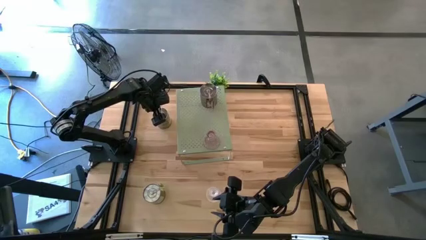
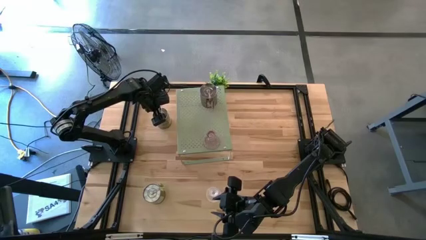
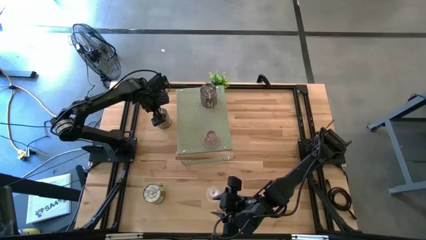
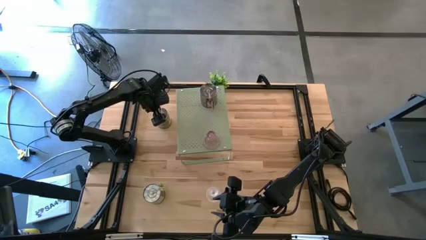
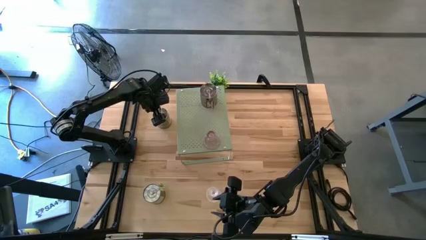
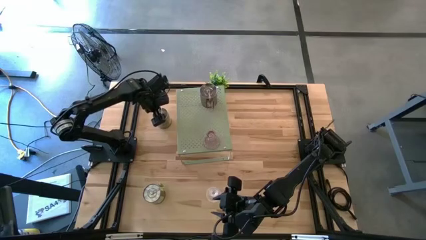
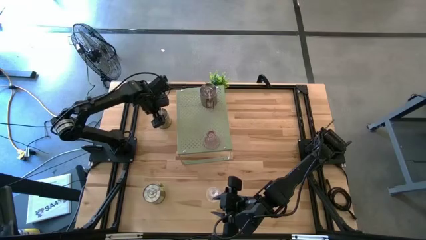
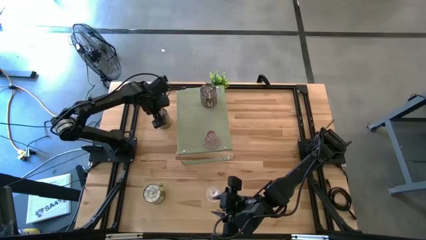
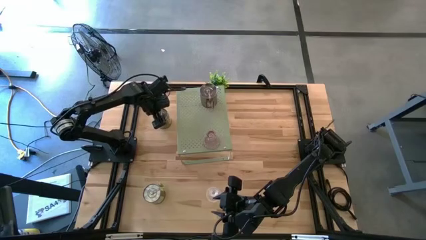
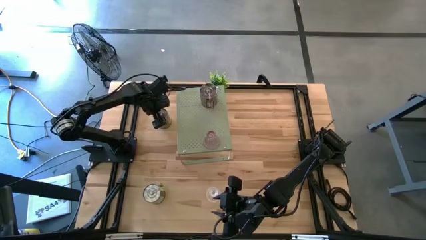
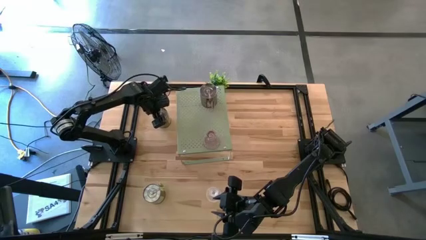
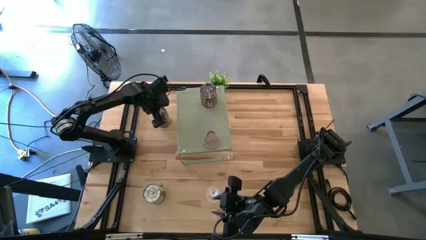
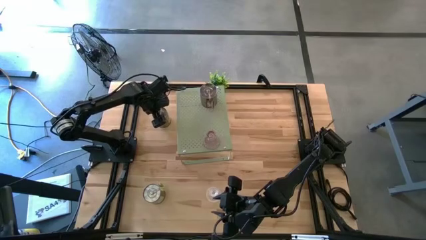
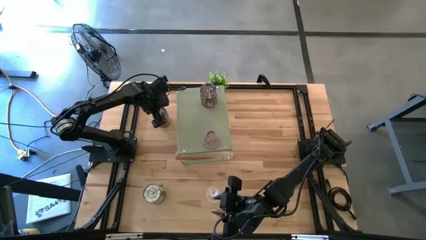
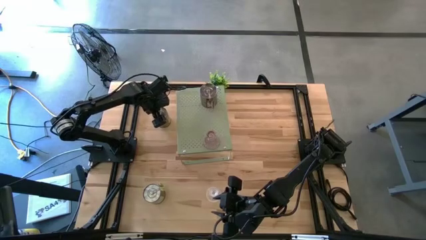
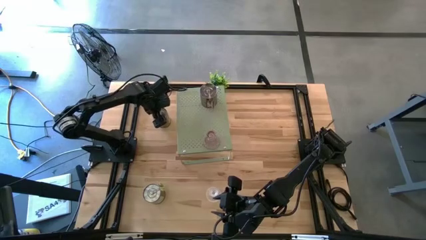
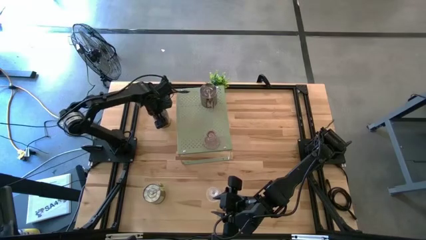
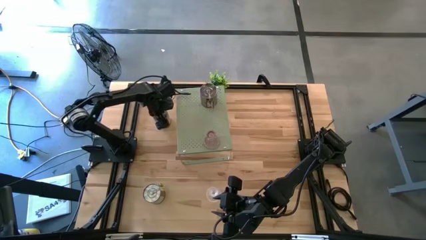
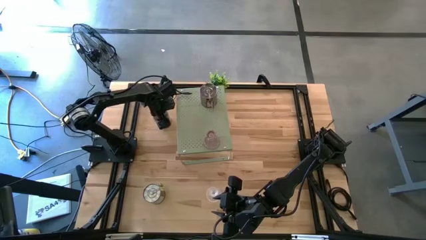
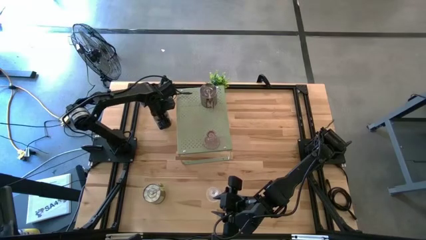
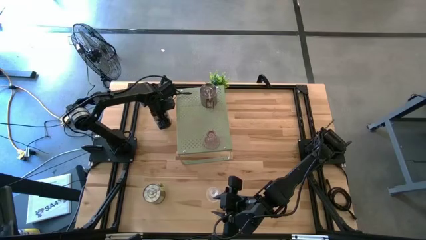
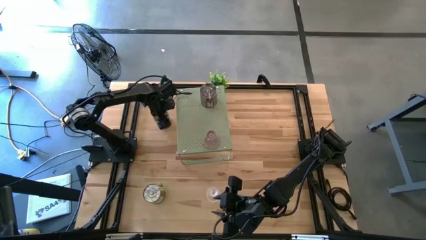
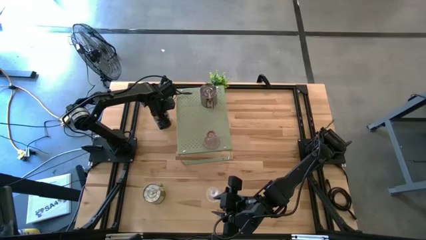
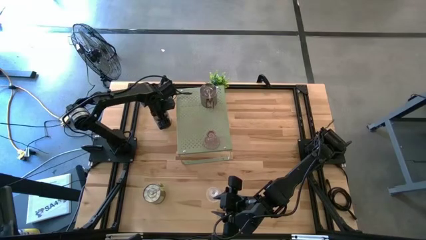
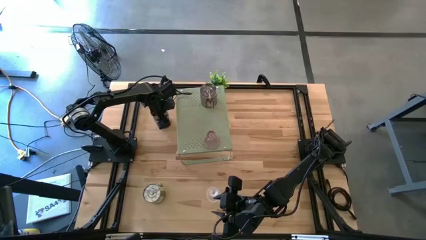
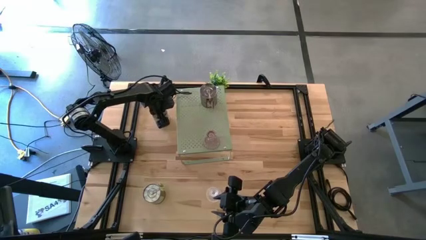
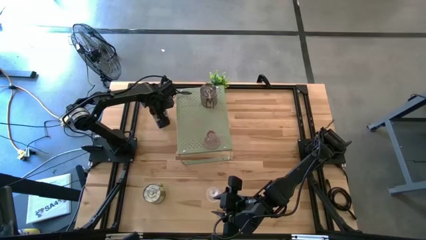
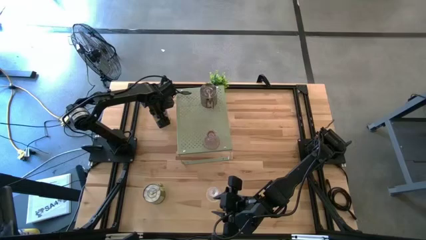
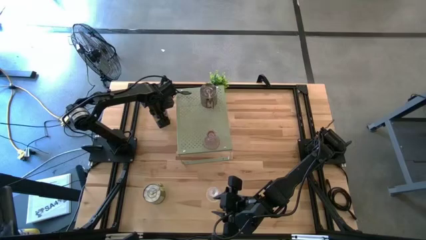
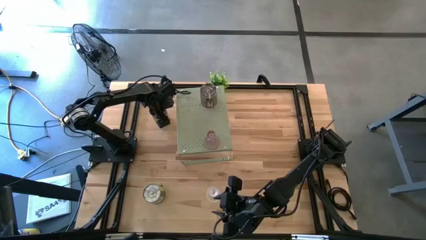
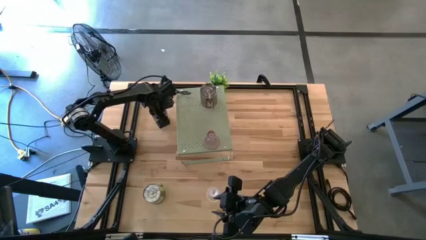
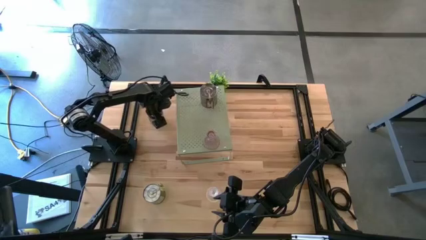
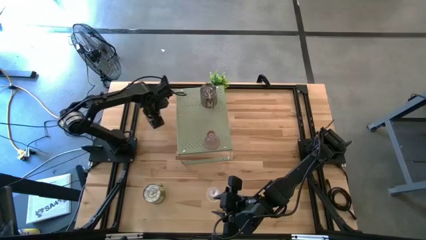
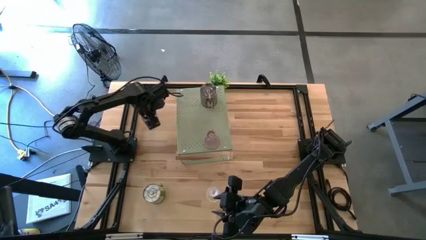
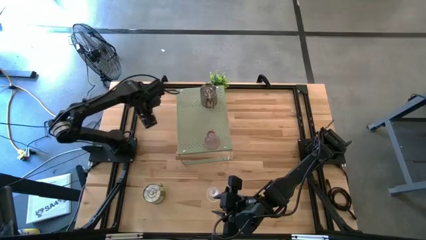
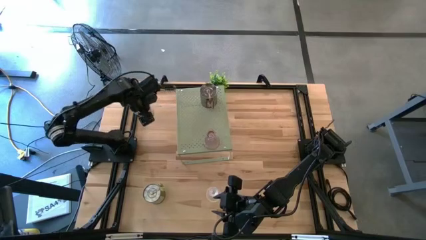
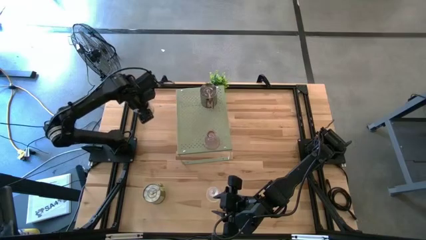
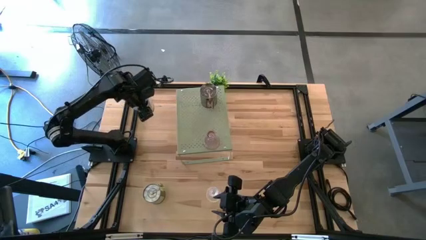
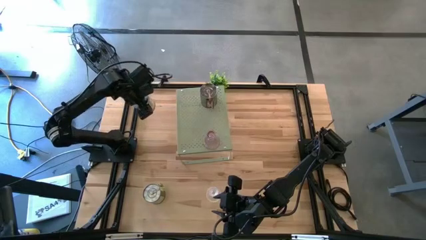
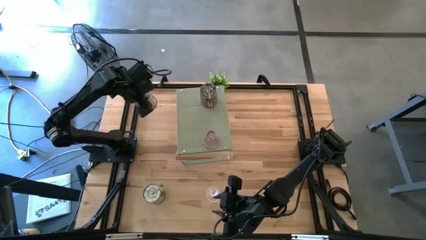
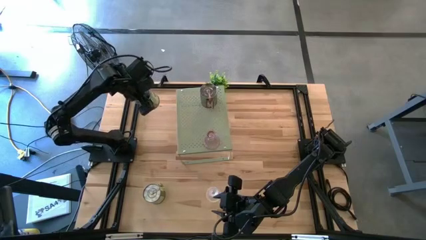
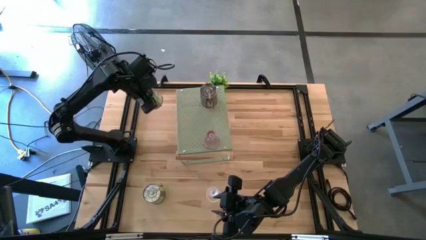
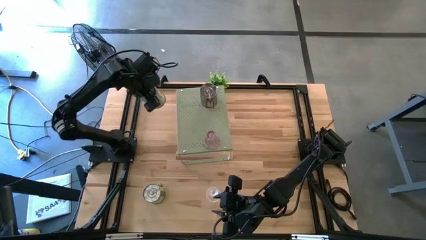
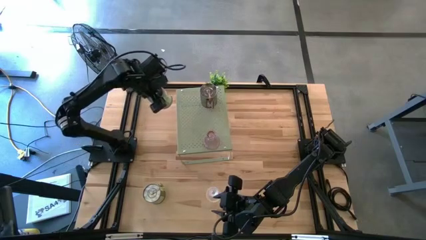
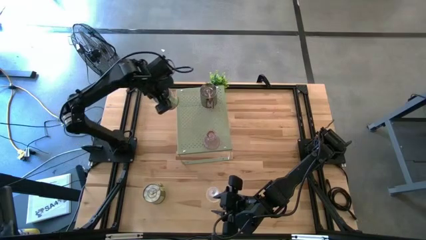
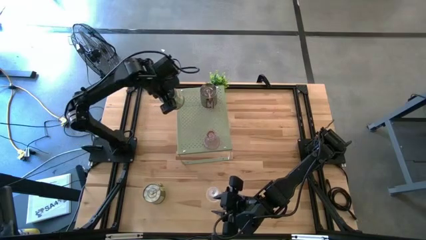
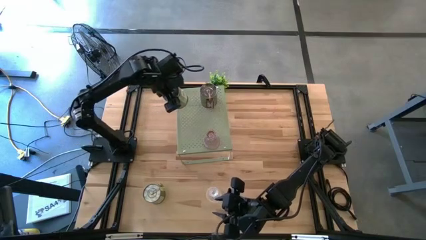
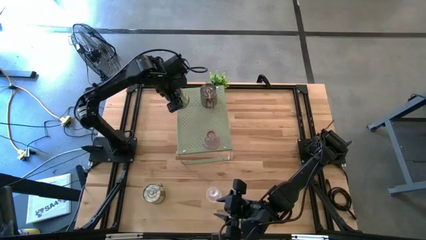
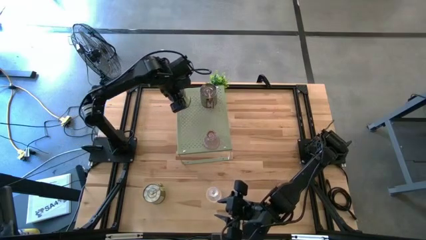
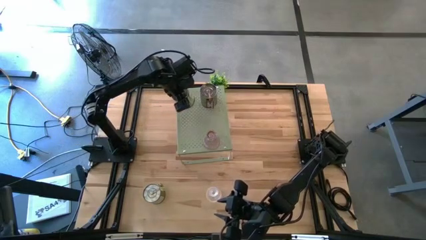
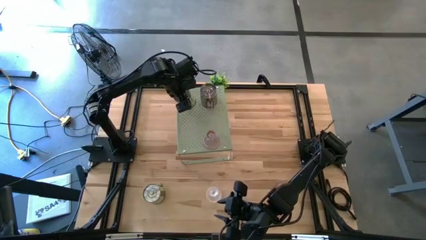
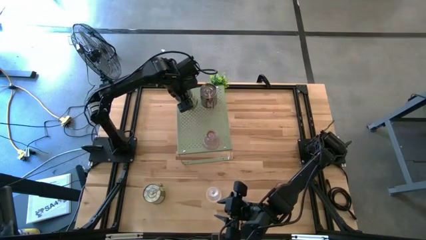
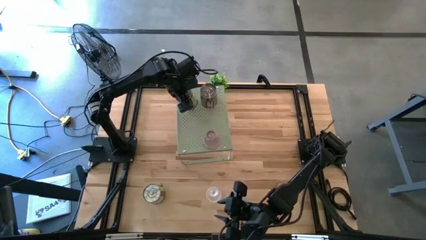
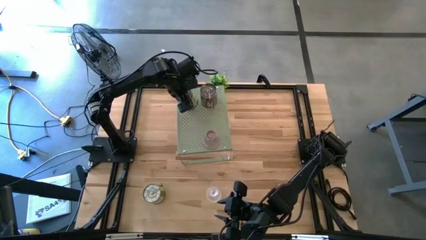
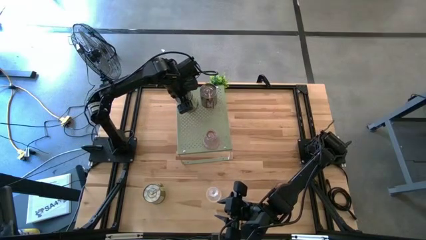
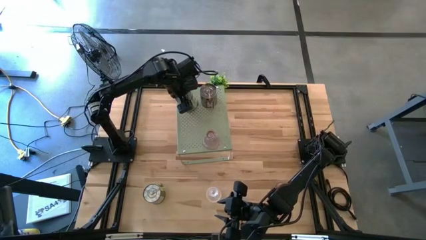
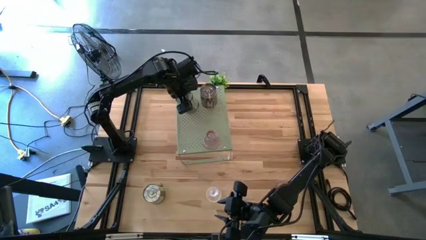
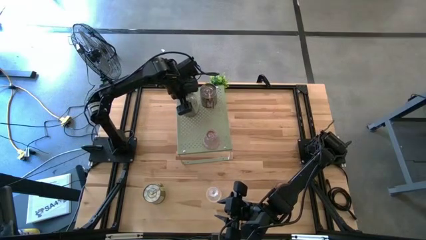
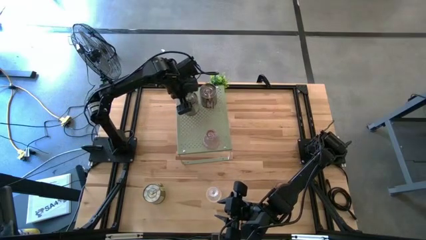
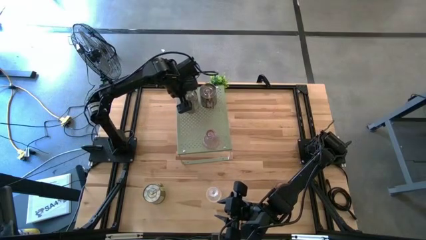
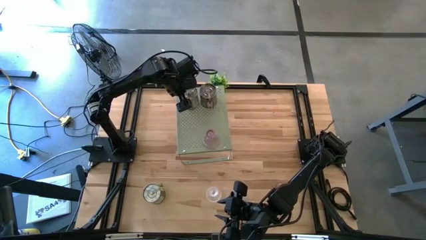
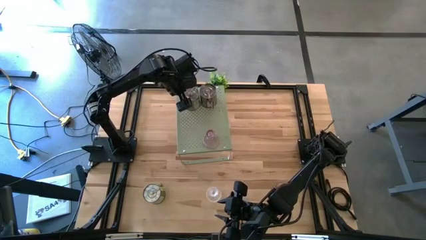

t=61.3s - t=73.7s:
Task: Pick & Place candle stick holders
Put the top brown scented candle on the shelf

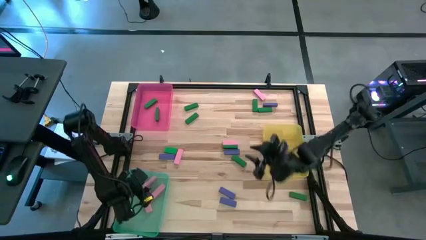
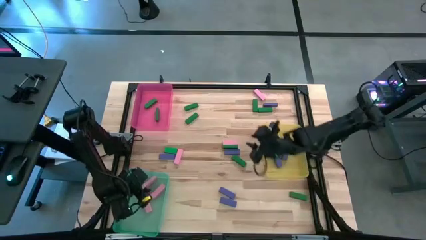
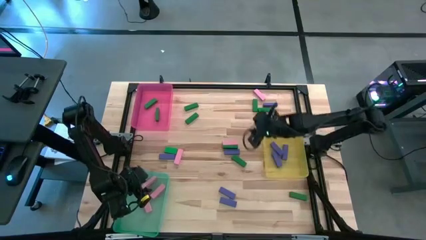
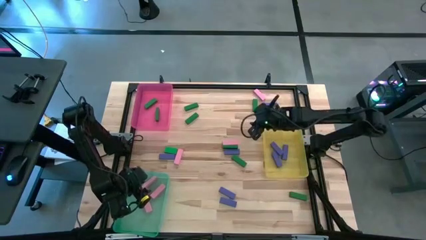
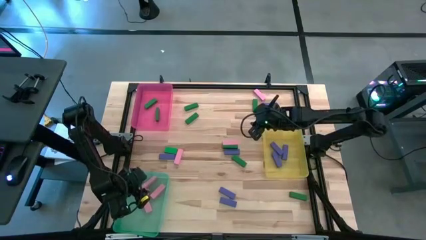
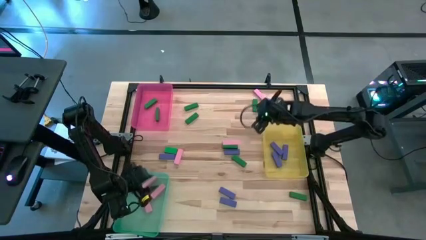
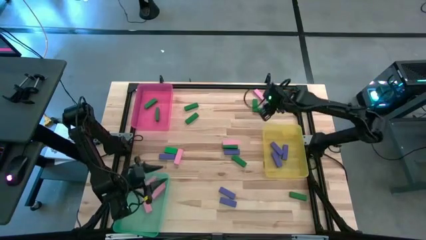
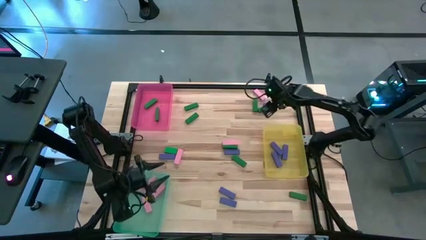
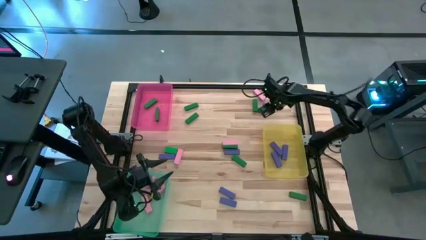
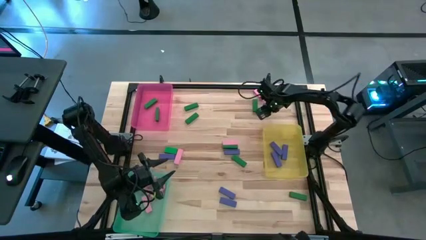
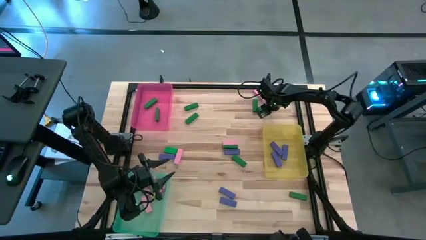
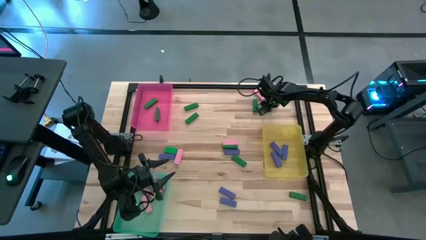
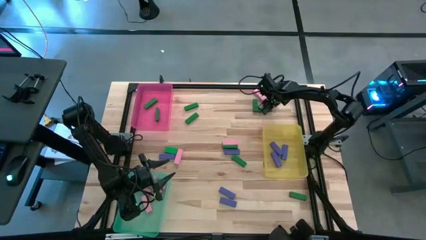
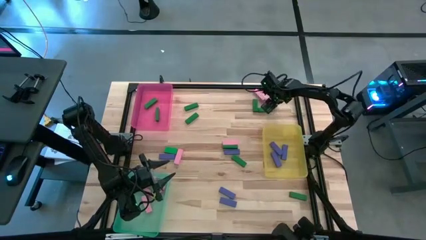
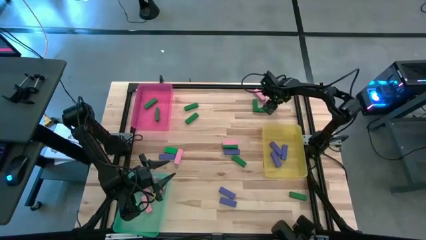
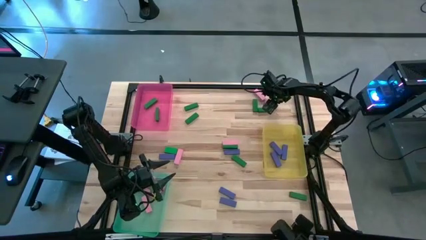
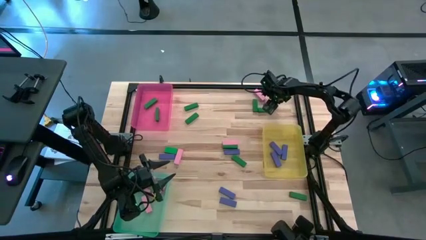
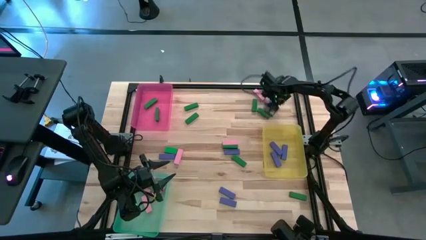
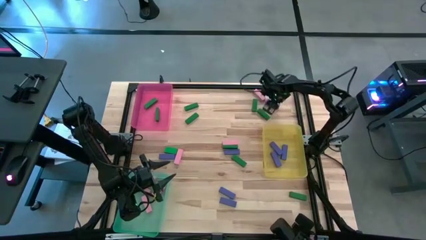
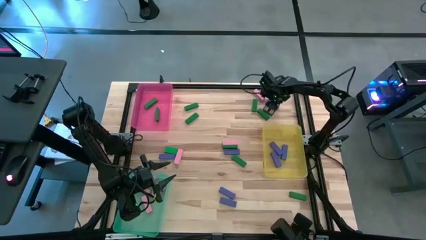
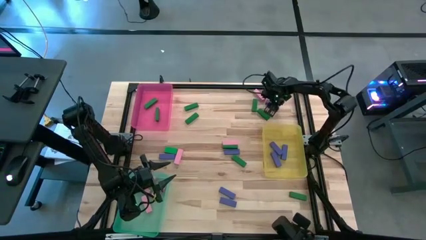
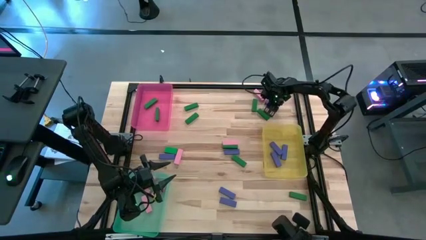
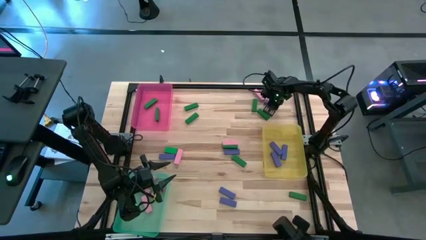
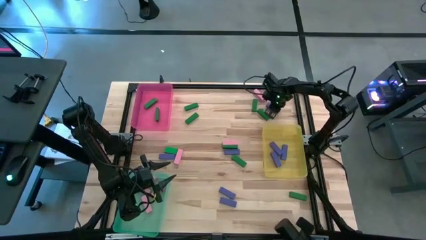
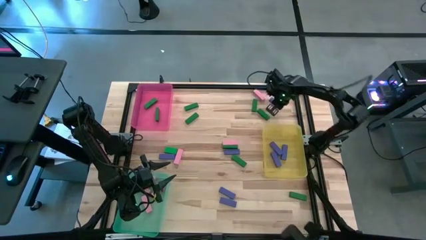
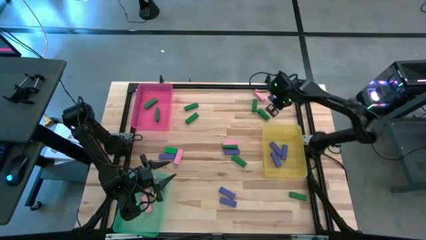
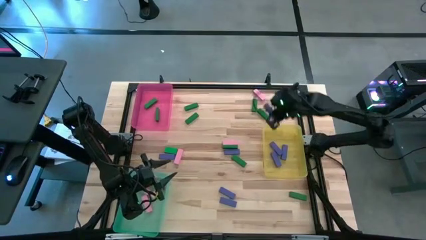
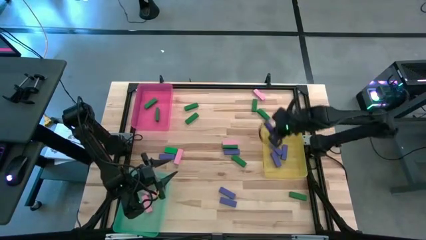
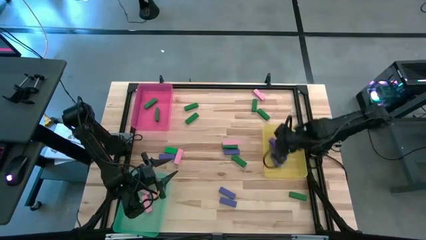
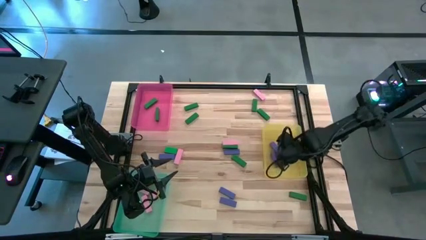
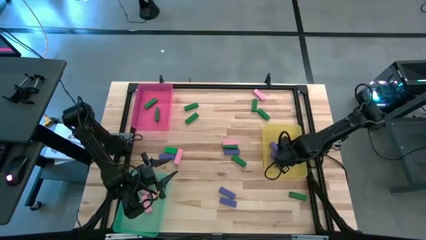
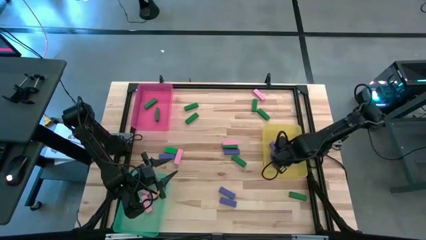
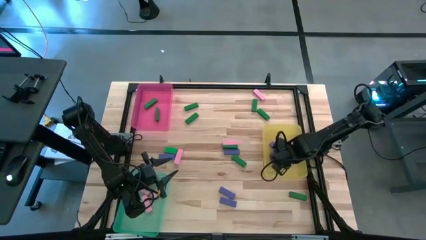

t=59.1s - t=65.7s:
Task: Sort blocks
Put the blue block into the yellow bin
